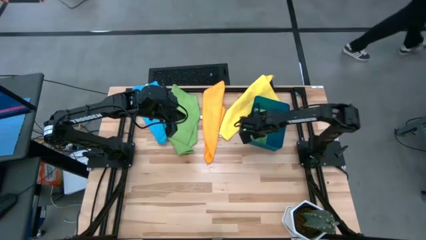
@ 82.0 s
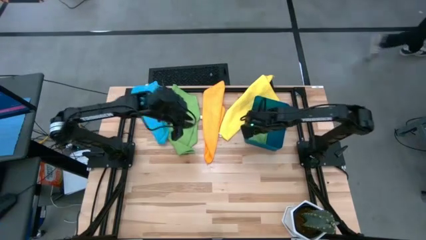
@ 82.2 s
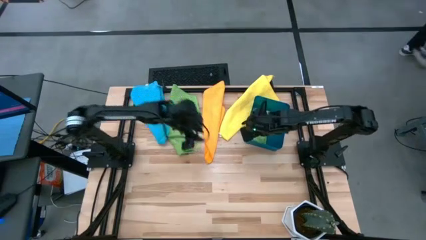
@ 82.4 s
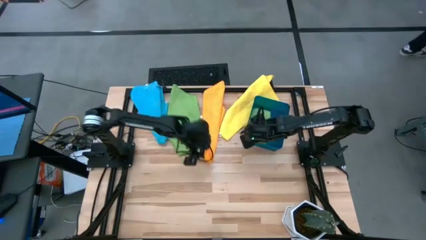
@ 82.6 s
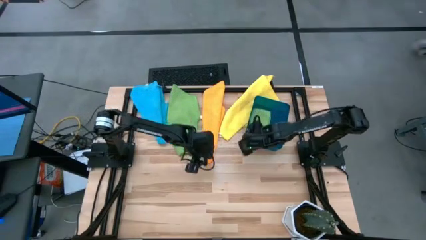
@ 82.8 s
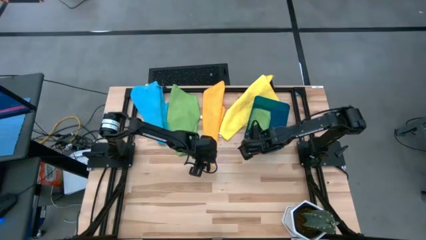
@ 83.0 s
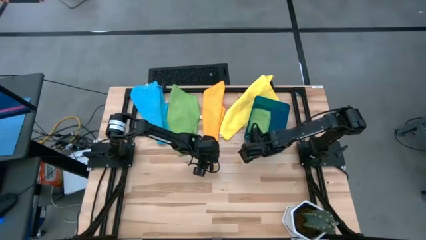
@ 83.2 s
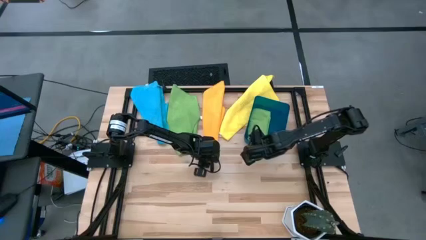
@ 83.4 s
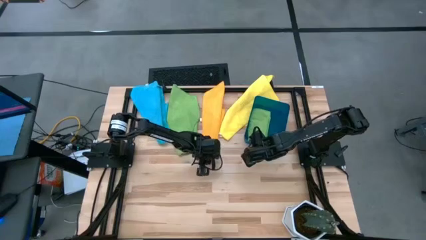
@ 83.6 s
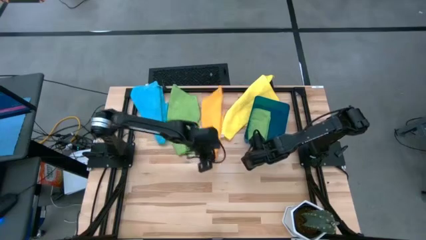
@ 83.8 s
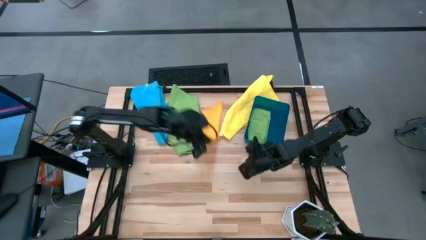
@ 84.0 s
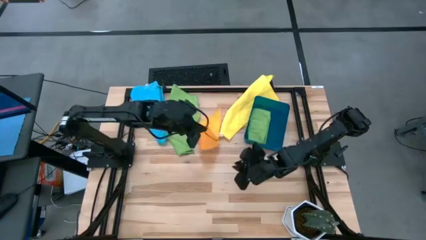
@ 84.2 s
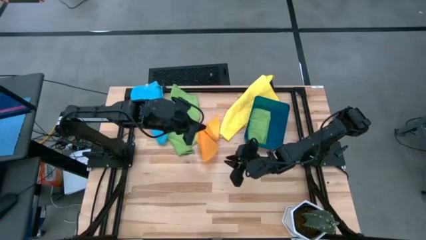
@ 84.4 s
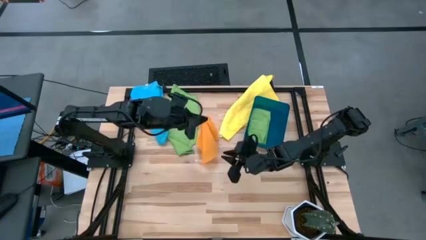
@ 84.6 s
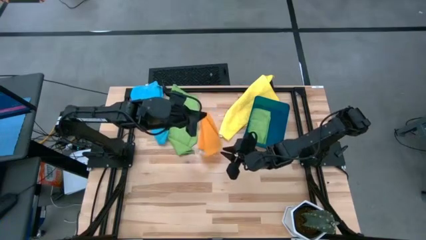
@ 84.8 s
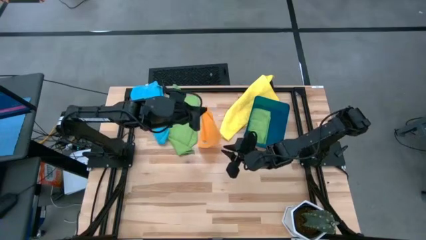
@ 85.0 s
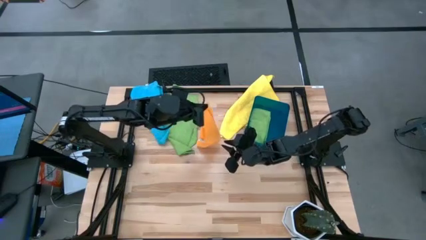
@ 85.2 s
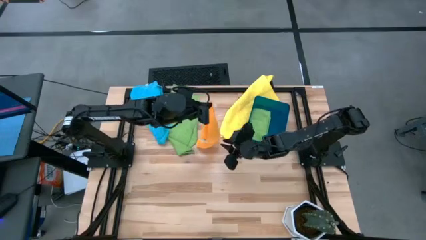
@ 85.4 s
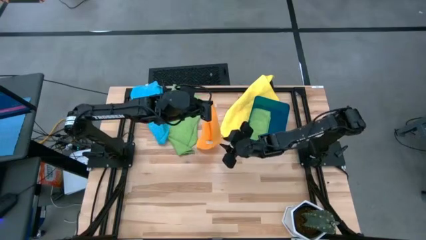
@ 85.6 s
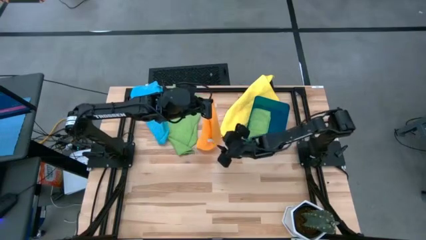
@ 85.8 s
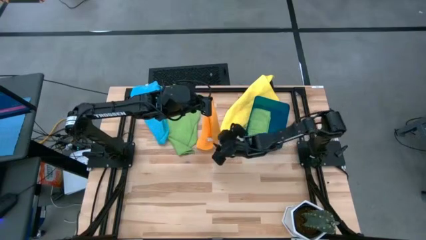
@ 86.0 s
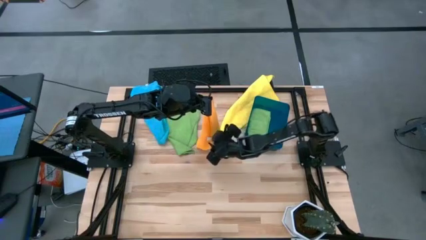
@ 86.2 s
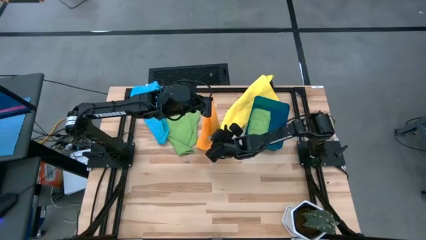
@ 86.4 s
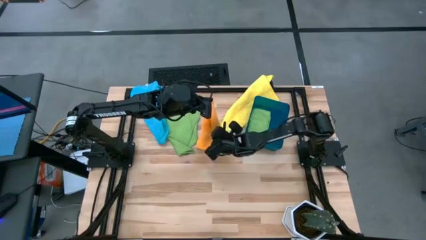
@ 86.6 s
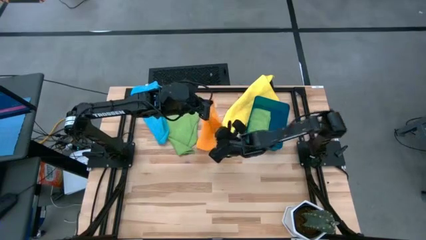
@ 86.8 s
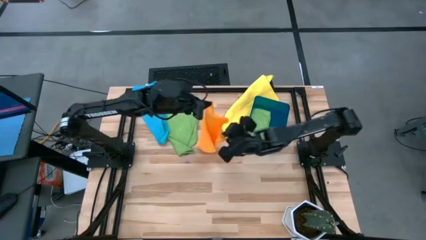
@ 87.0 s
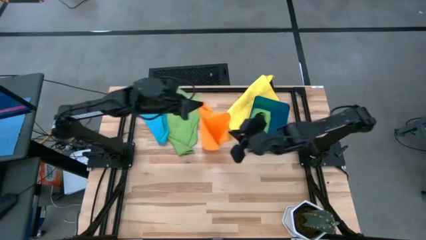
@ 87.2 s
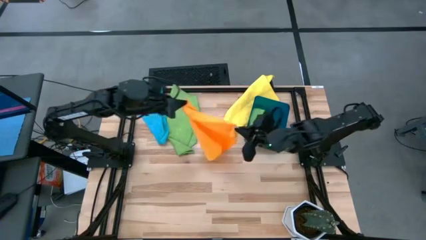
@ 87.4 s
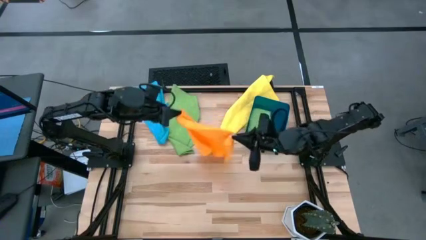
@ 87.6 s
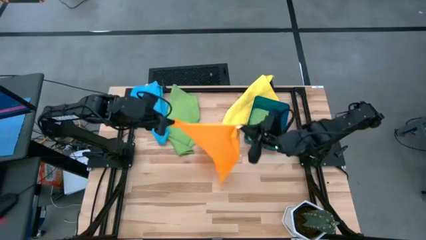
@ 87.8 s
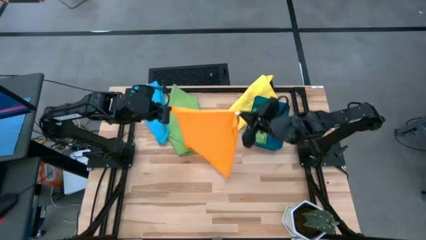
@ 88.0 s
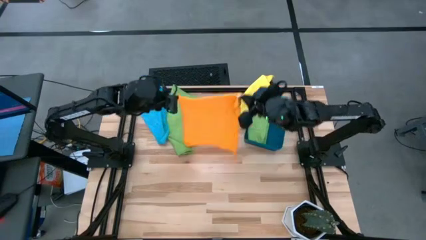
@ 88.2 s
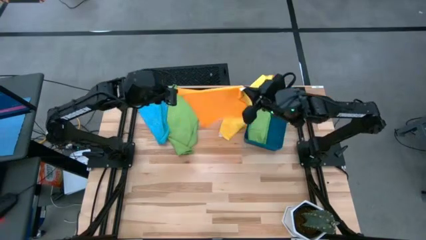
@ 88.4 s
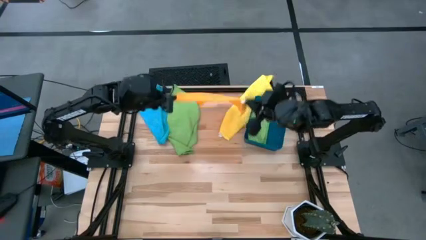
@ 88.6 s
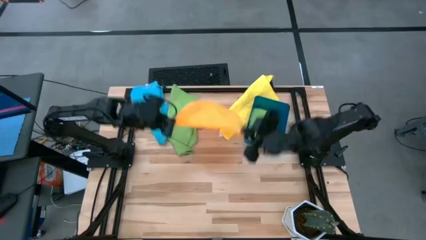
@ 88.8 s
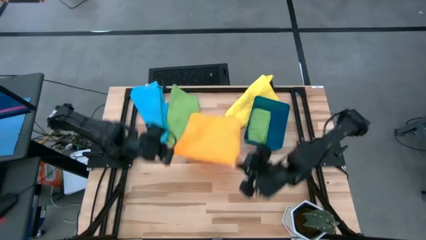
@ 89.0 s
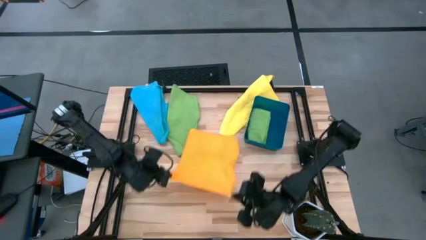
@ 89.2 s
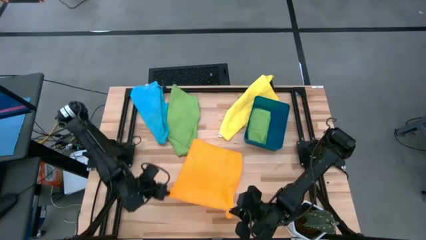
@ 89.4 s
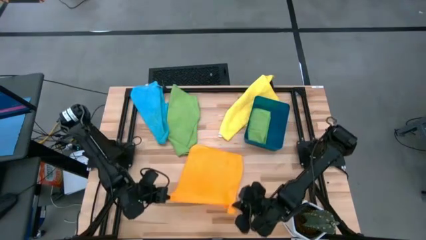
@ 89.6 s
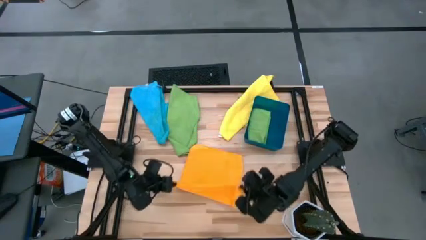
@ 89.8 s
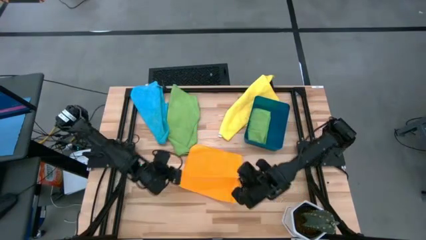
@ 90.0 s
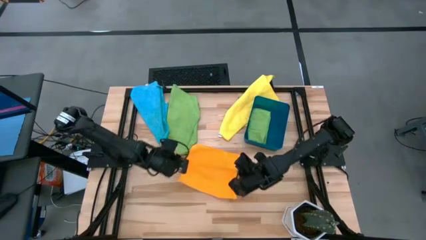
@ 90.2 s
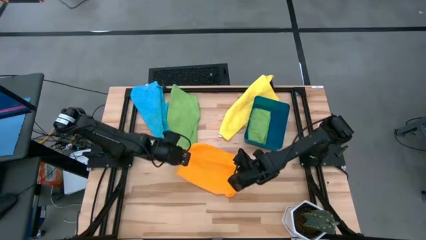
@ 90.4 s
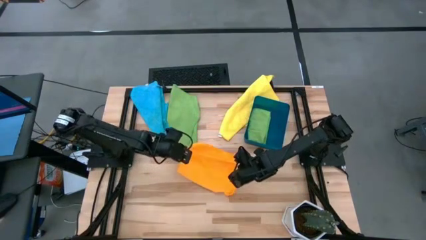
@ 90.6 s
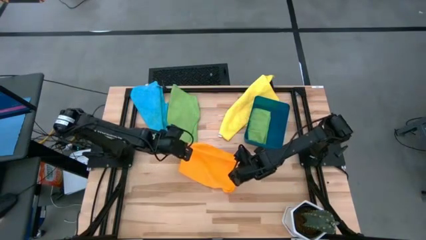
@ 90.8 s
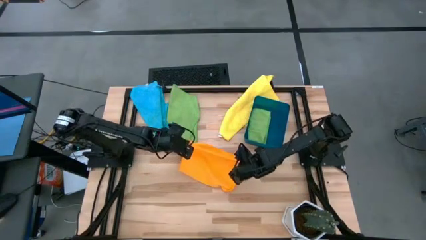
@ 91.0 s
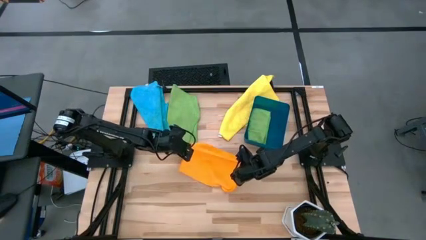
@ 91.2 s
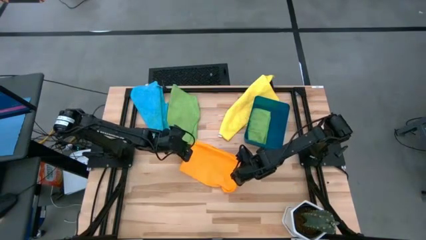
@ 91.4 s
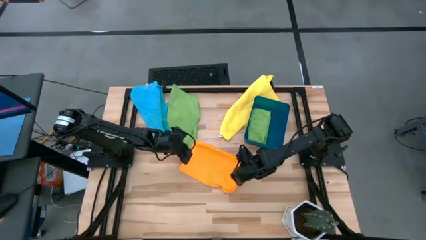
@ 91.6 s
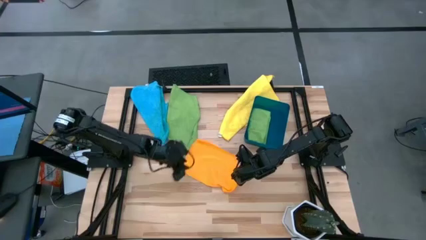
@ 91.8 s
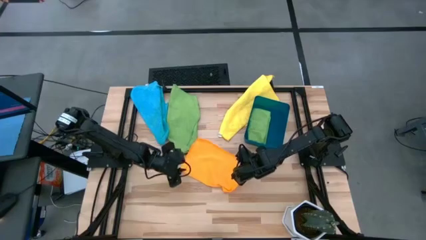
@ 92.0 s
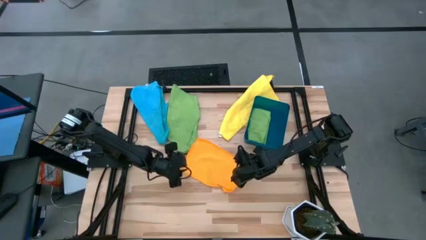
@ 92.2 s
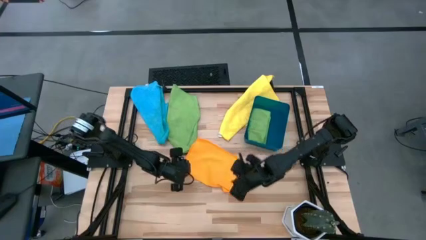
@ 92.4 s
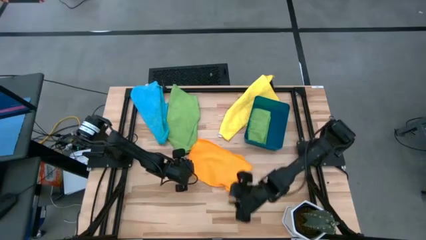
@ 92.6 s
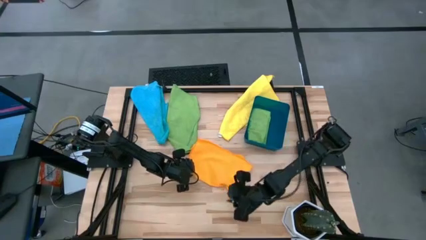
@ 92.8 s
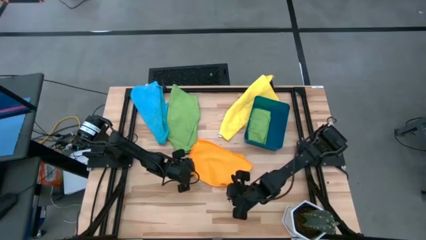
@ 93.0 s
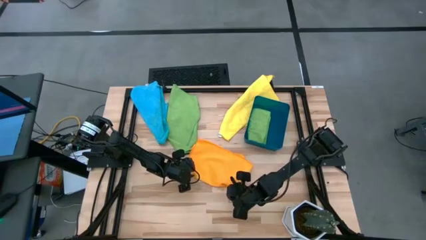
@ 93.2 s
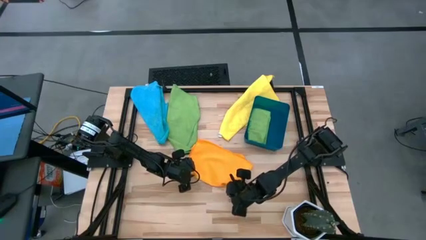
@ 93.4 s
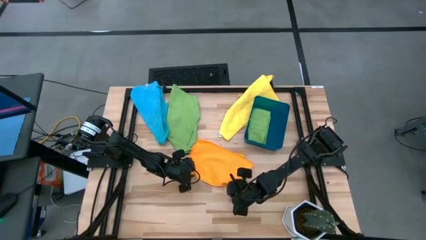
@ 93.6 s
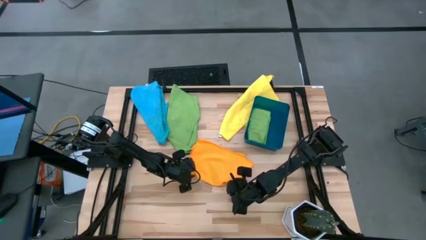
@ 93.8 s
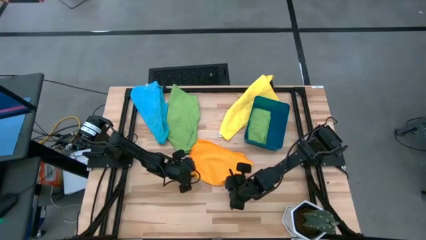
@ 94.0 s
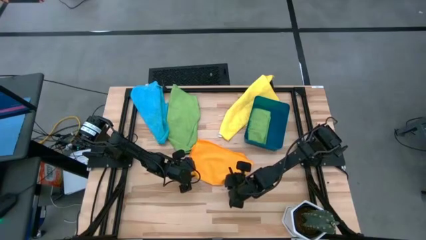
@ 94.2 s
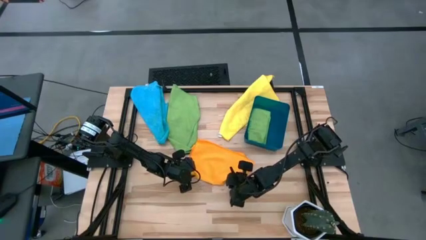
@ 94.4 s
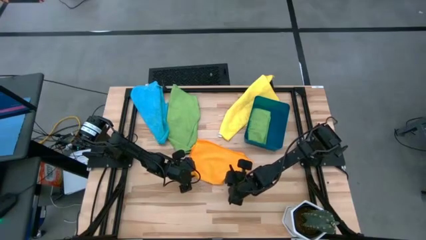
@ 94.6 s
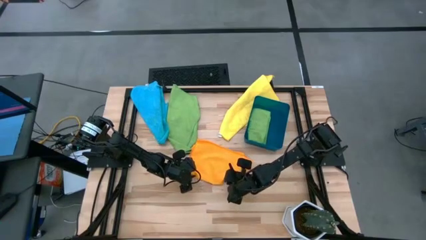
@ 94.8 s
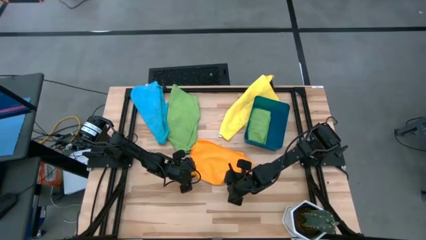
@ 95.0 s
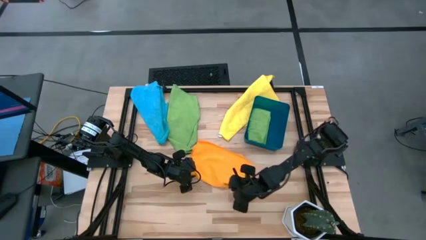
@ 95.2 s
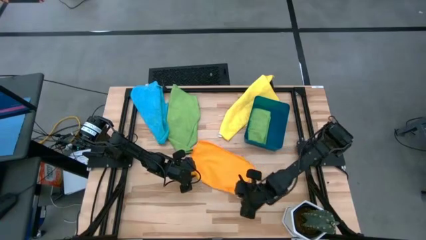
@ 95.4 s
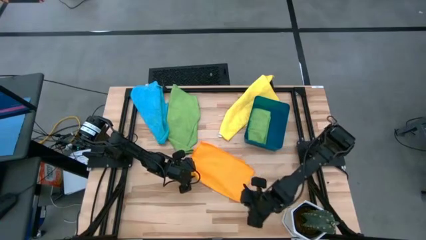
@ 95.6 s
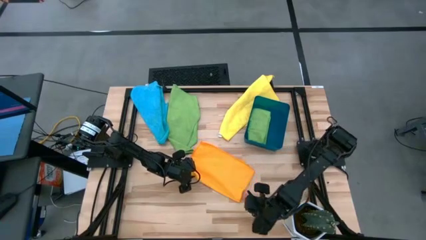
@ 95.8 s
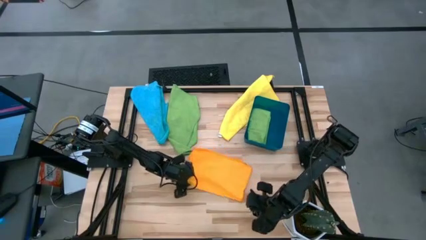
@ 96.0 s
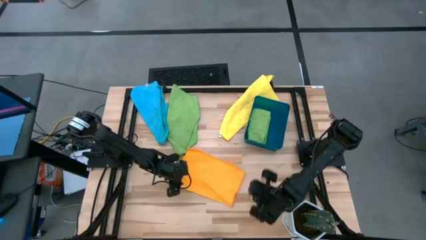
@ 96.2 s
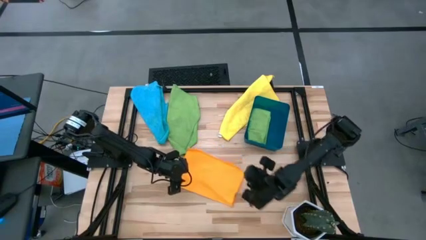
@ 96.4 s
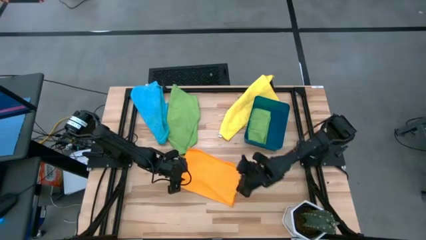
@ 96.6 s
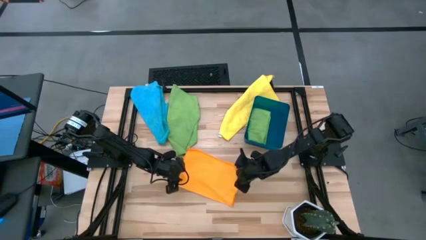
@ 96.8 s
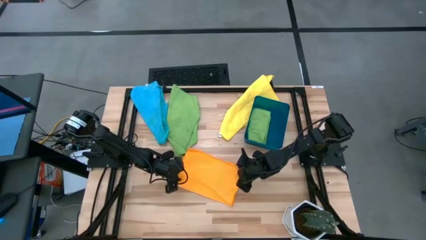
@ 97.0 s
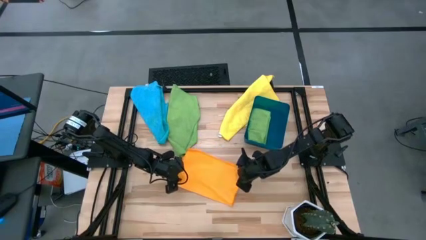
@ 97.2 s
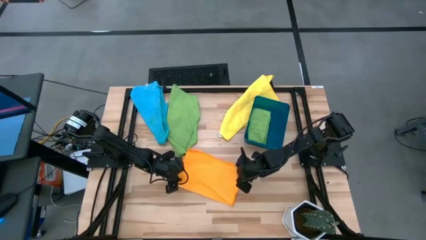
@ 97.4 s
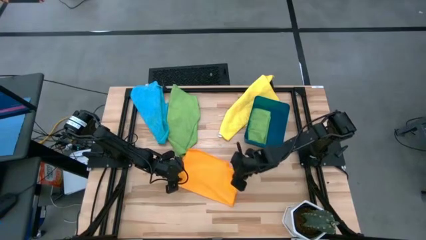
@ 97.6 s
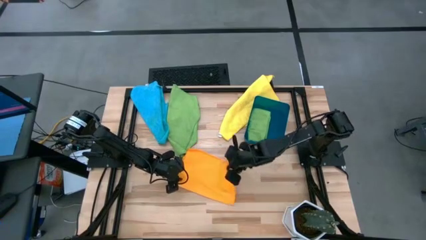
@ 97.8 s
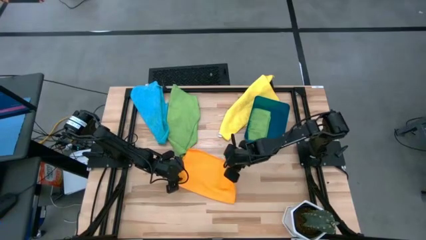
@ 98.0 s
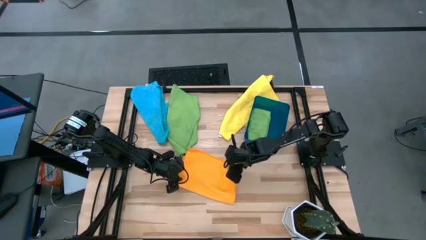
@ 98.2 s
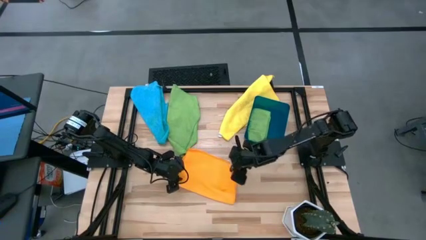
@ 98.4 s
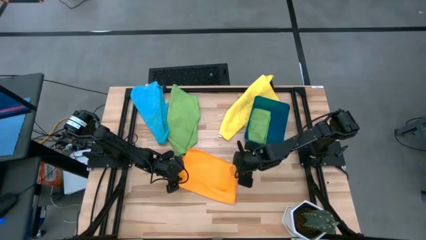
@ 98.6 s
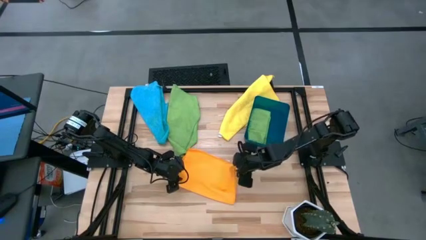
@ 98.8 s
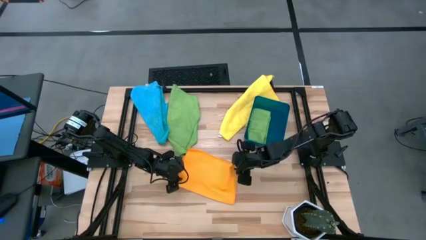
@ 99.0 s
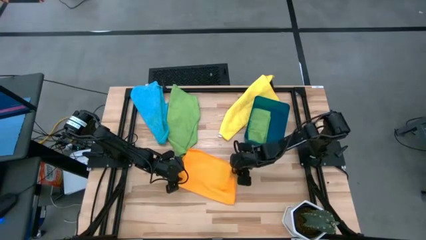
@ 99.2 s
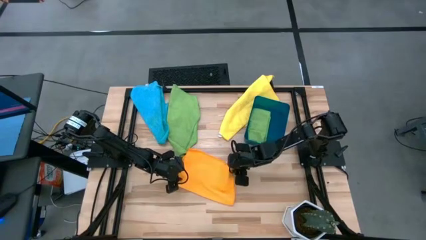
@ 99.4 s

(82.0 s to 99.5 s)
Task: Fold microfiber towels
Fold the orange microfiber cloth
